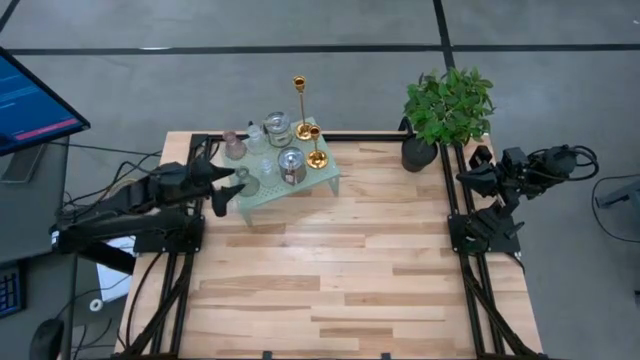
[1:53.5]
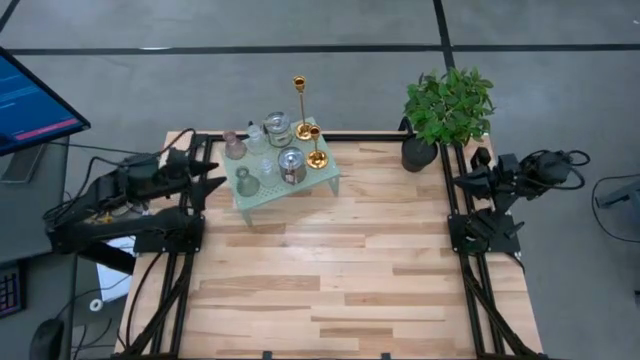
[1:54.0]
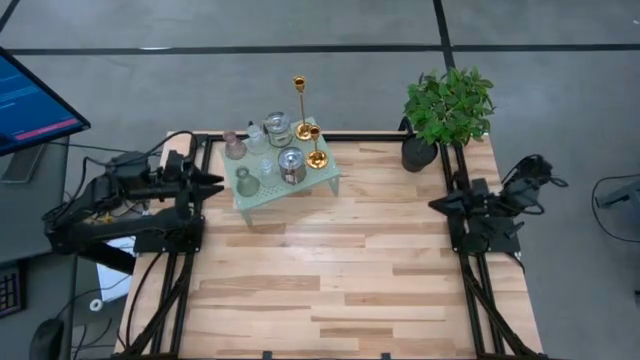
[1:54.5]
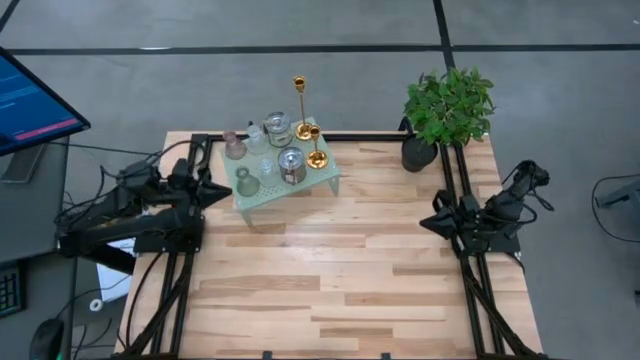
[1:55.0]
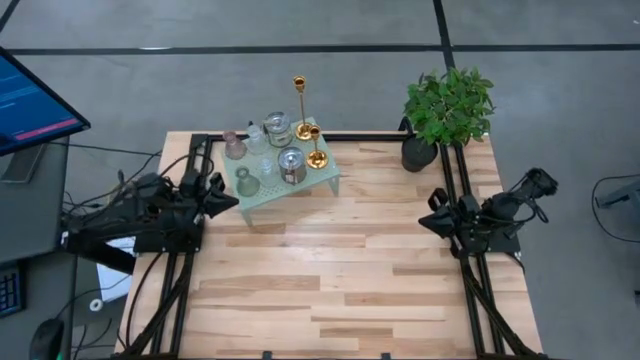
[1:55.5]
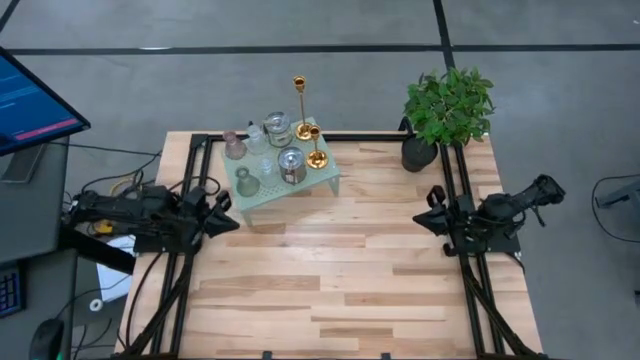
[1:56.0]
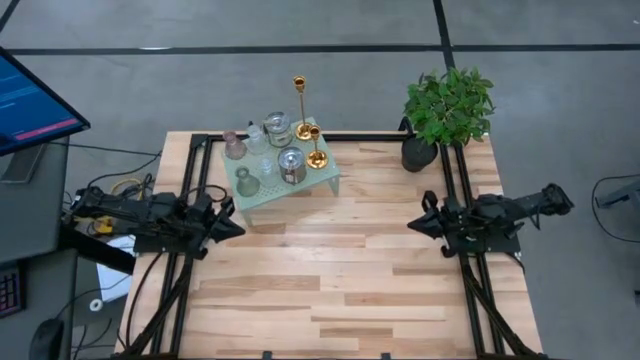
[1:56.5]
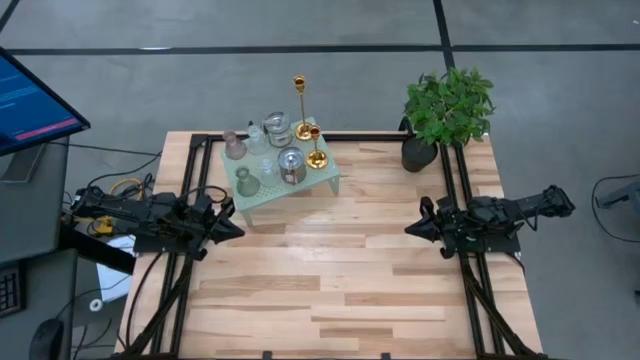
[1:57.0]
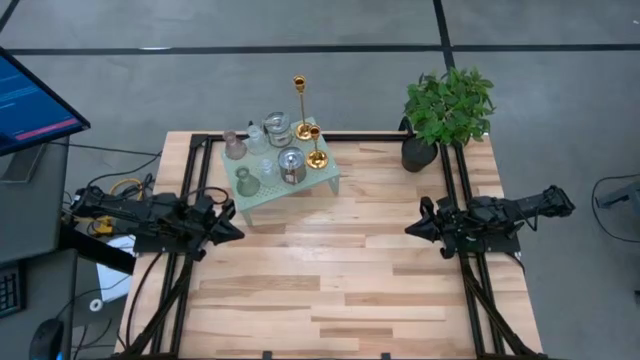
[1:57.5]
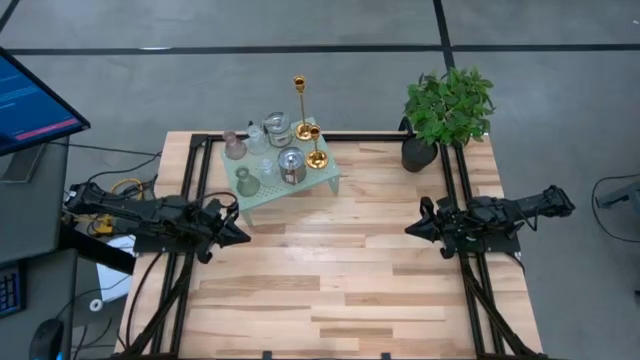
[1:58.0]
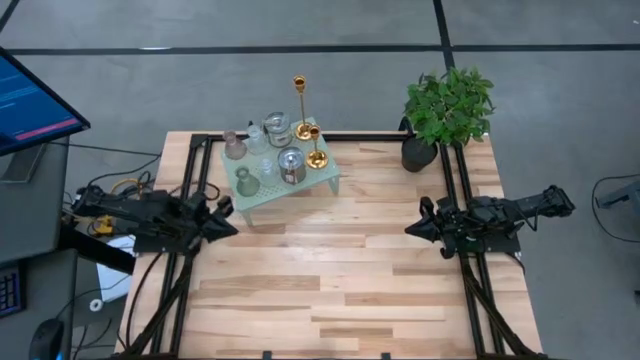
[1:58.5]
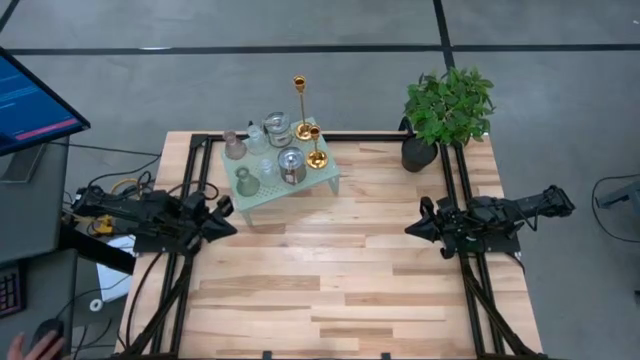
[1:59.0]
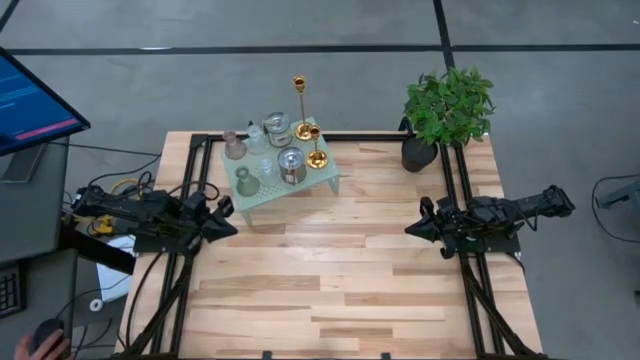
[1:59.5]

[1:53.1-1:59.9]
Task: Pick & Place candle stick holders
Return to Home Position

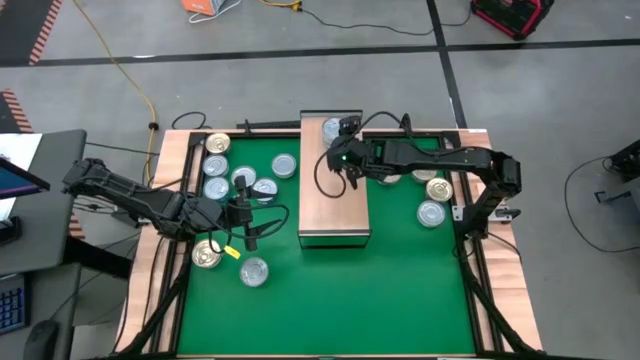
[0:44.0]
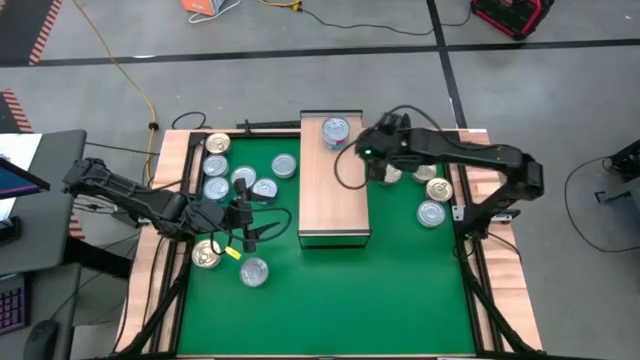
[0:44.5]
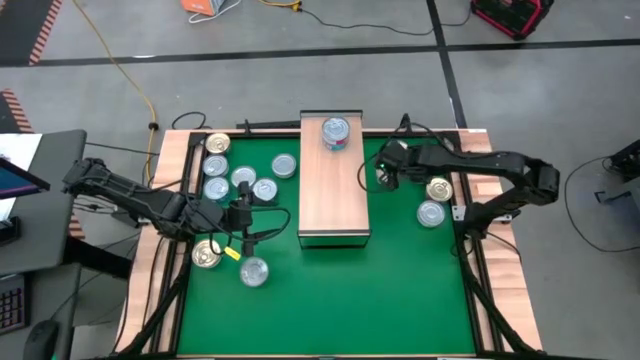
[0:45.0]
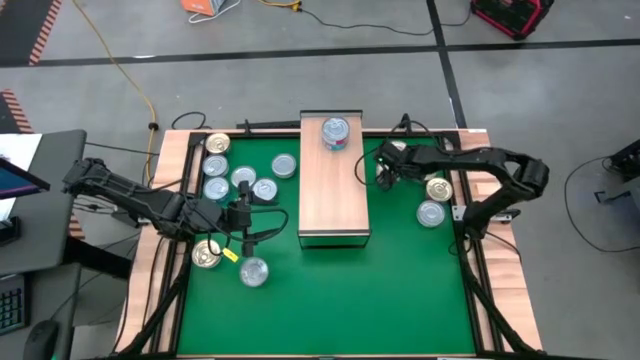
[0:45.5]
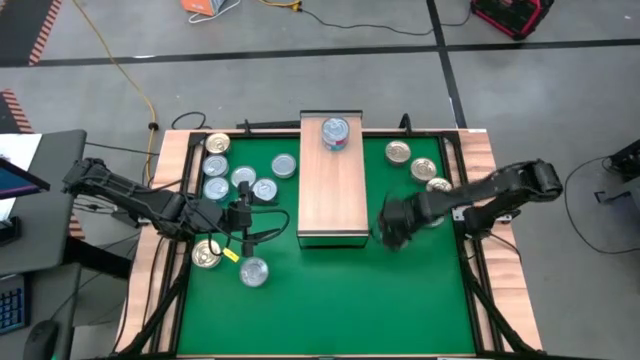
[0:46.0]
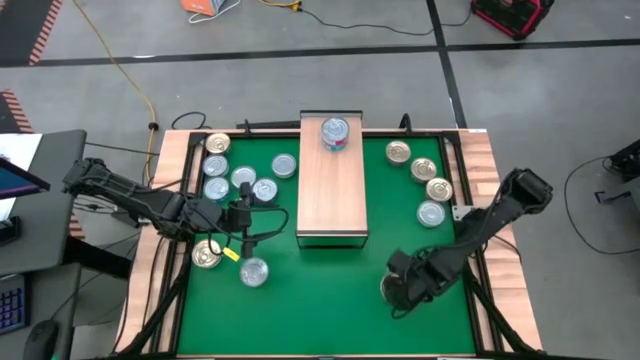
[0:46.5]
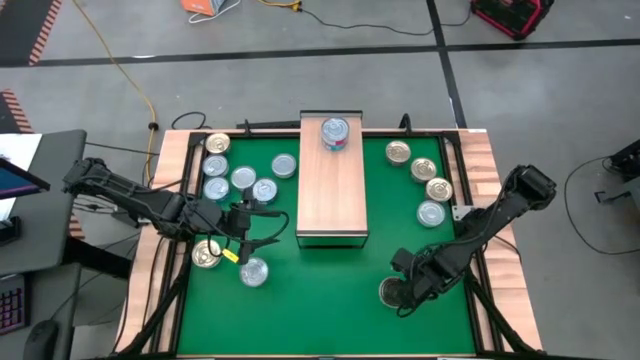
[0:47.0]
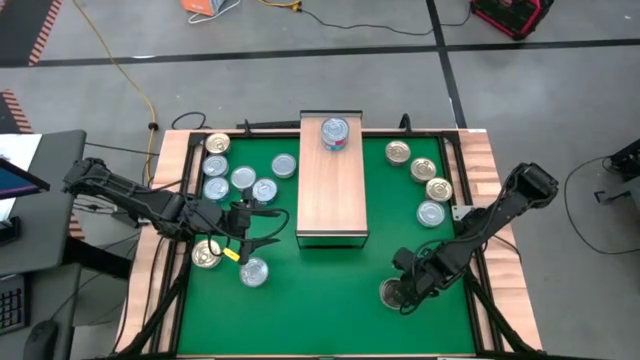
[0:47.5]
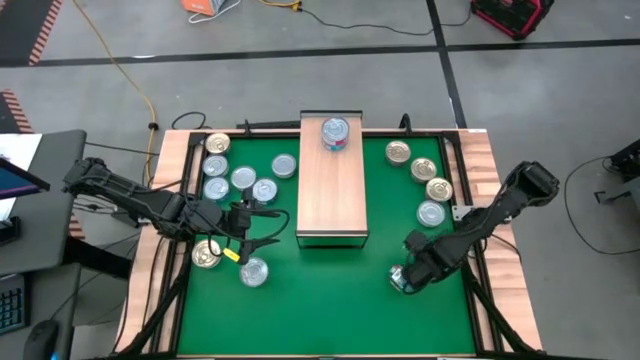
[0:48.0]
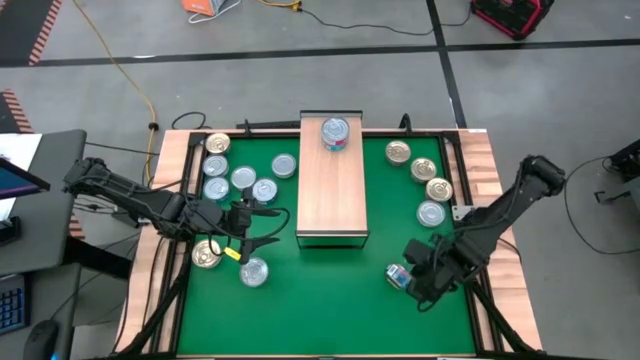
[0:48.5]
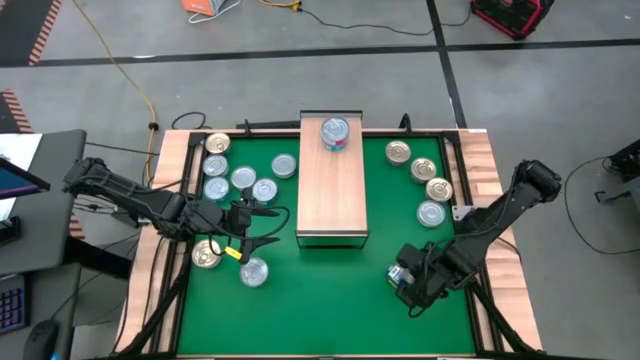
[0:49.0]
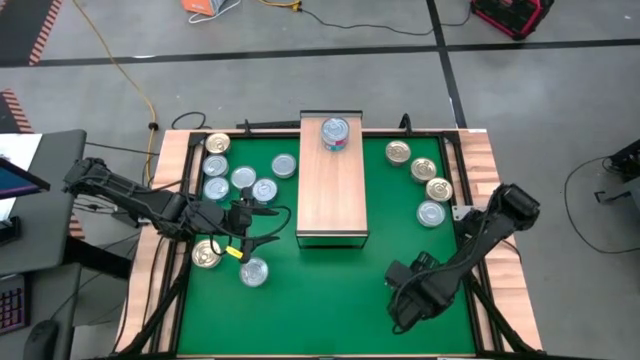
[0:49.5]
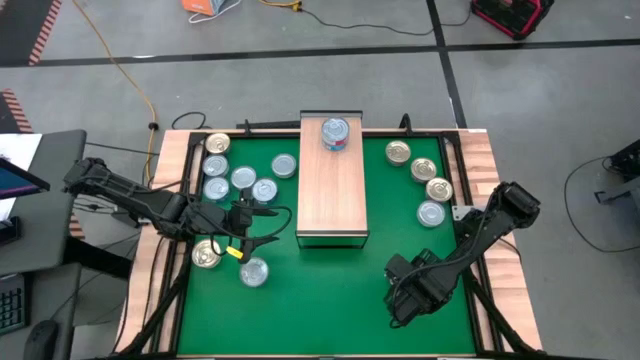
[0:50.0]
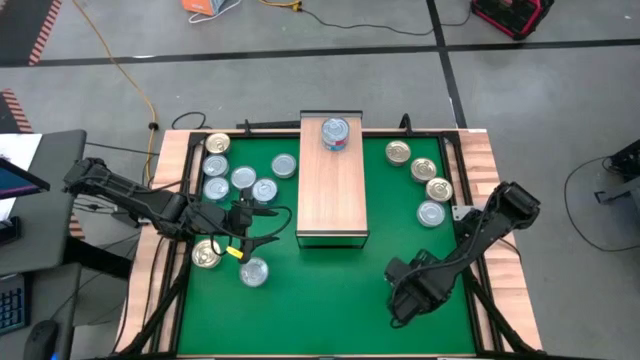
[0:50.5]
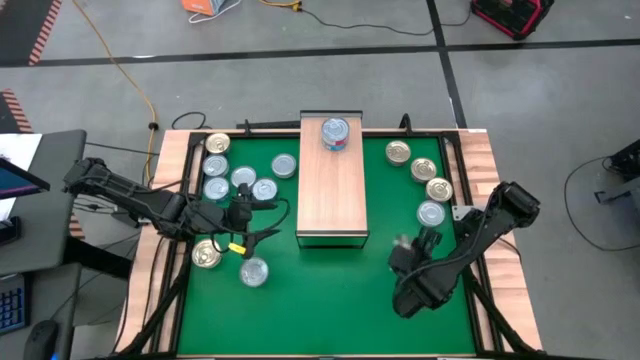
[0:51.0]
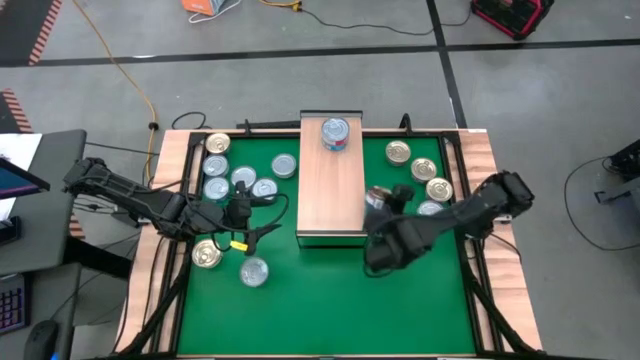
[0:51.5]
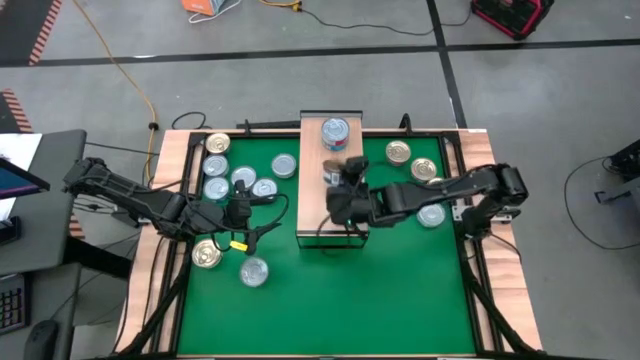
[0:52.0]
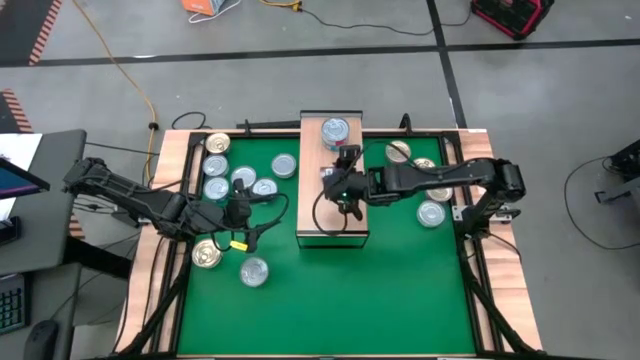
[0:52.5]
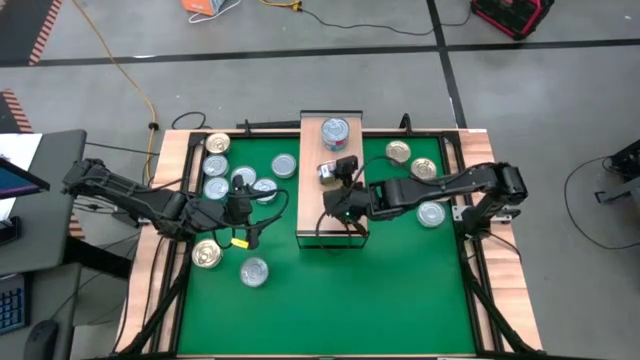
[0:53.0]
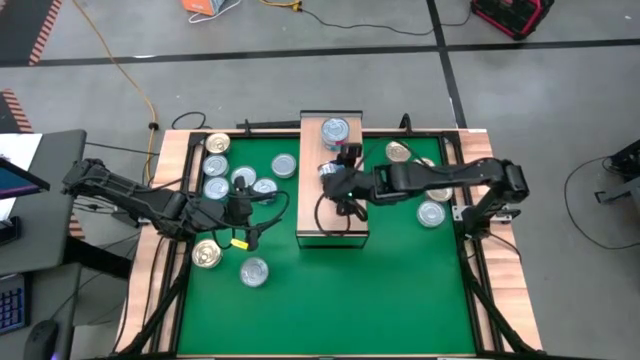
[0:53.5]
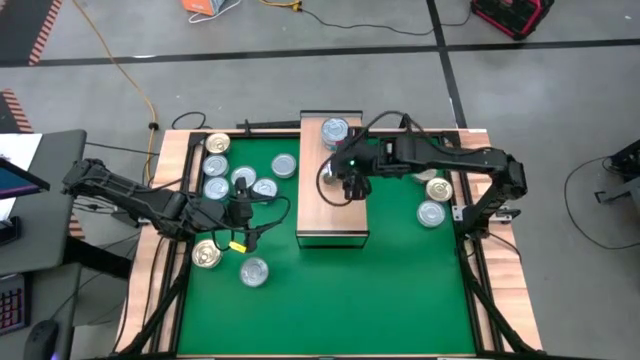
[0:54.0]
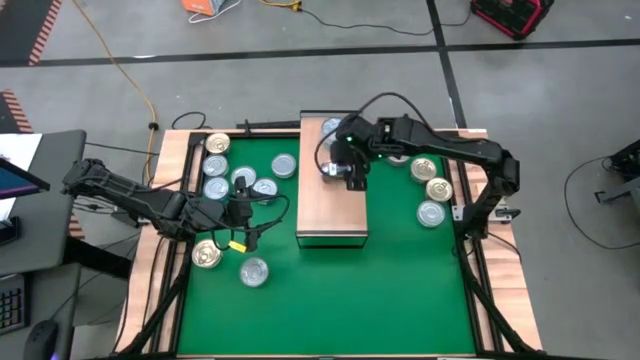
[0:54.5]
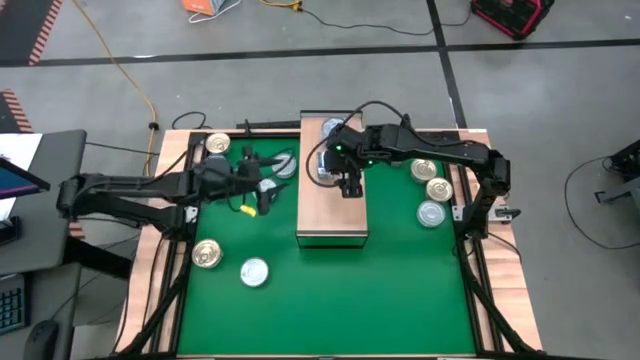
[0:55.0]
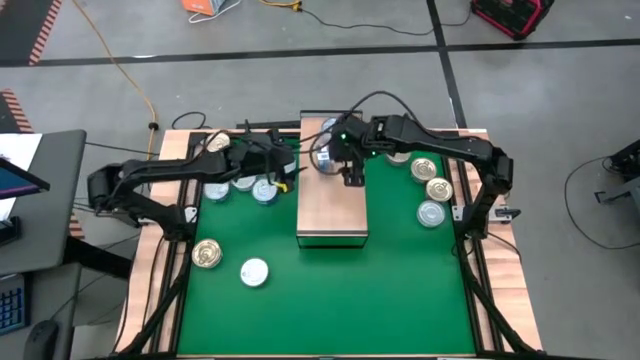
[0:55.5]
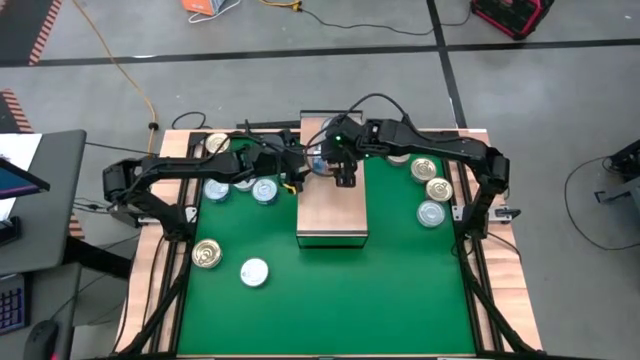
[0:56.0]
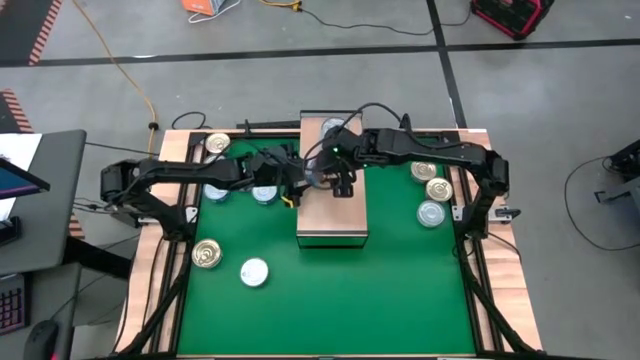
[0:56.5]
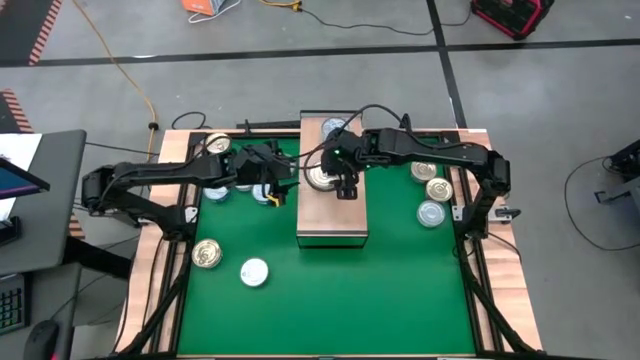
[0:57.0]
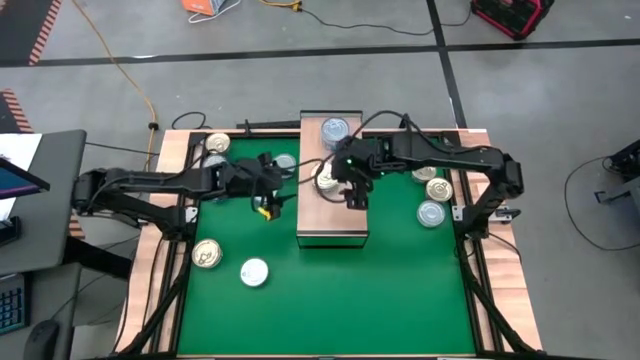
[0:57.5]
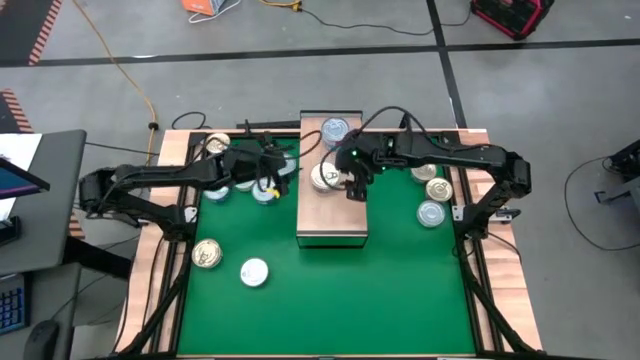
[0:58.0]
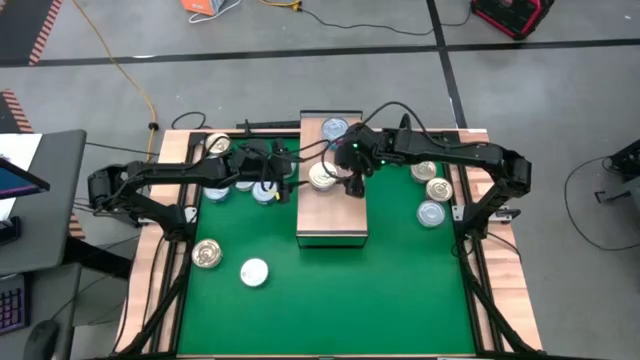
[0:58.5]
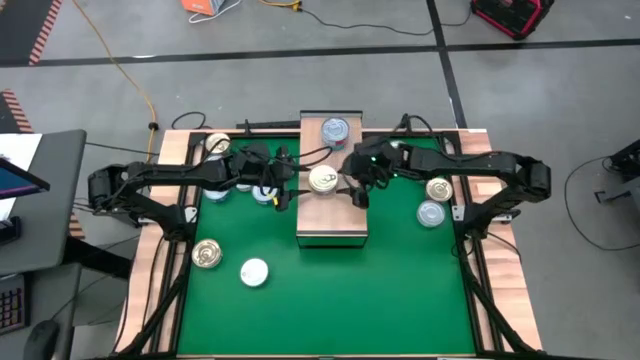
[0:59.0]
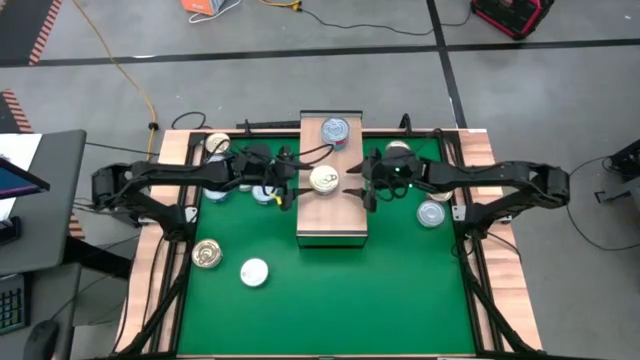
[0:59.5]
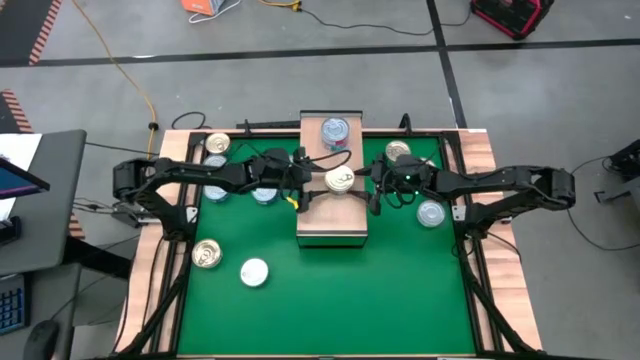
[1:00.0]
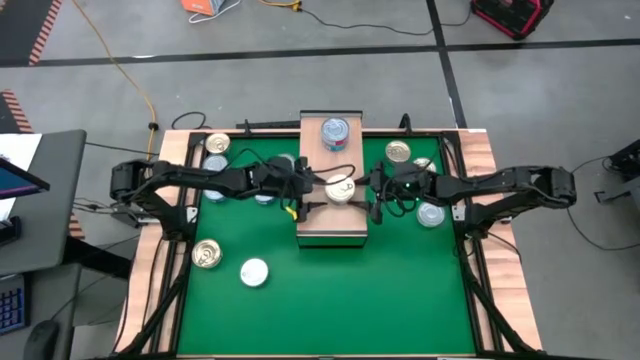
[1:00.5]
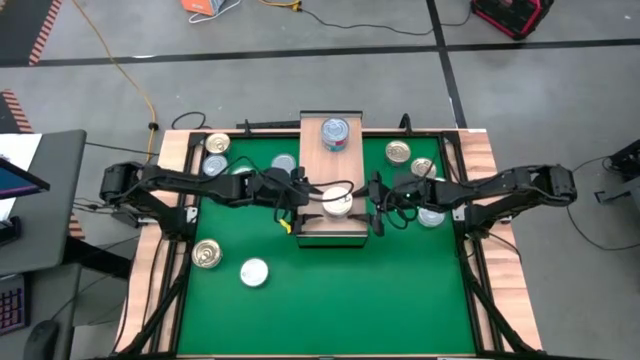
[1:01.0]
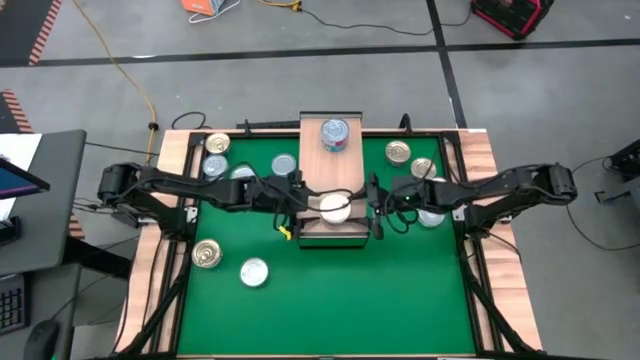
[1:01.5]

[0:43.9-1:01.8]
Task: Stack canned seafood by type on shelf
Put the blue tuna can on the shelf
